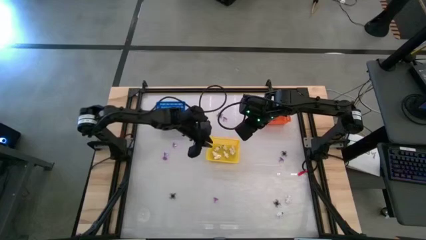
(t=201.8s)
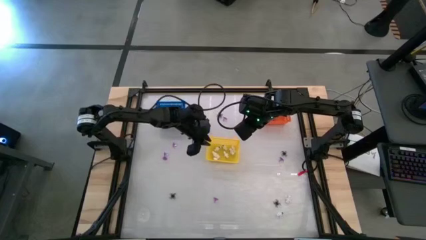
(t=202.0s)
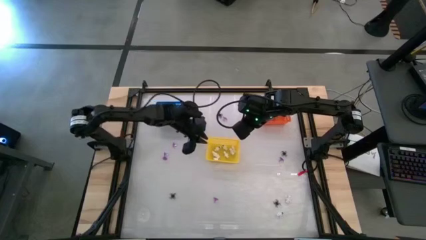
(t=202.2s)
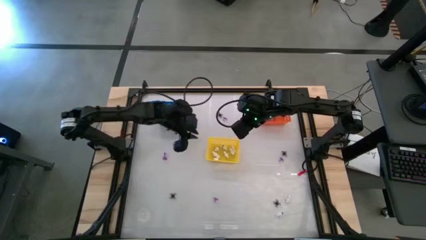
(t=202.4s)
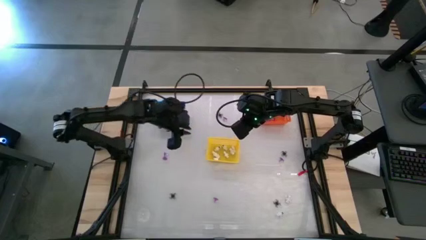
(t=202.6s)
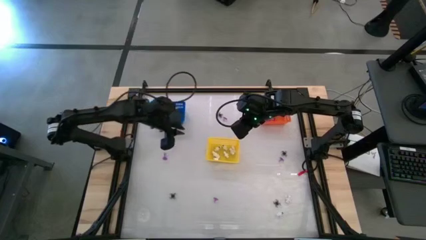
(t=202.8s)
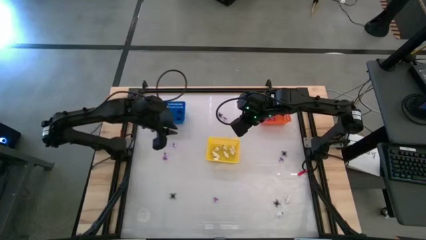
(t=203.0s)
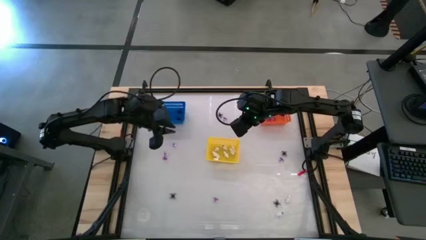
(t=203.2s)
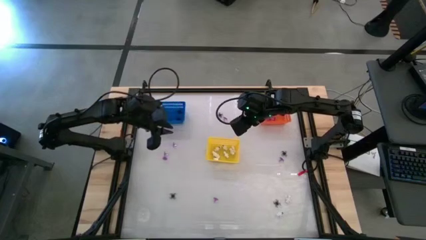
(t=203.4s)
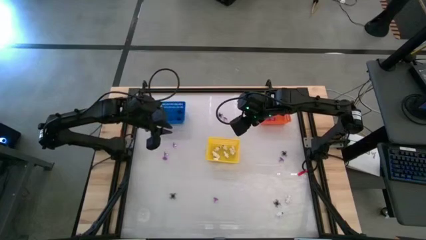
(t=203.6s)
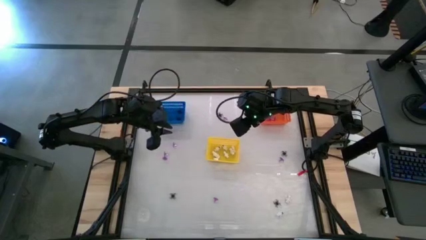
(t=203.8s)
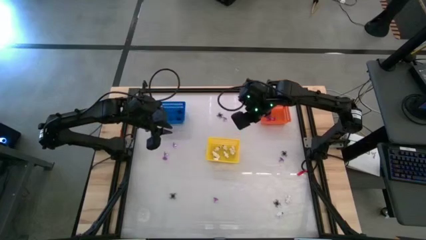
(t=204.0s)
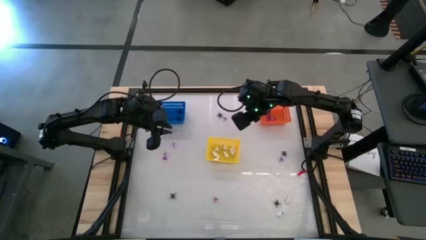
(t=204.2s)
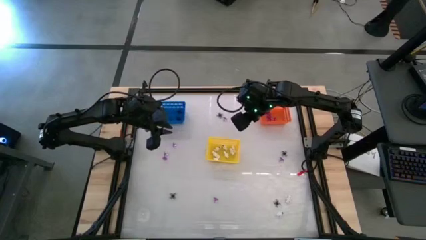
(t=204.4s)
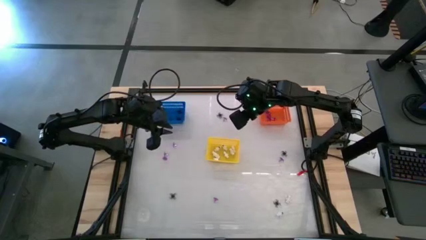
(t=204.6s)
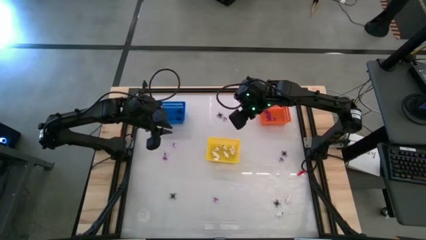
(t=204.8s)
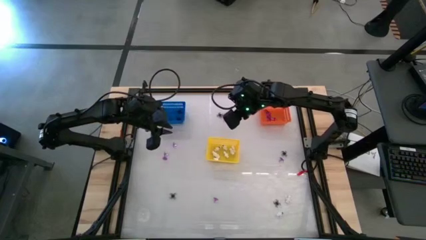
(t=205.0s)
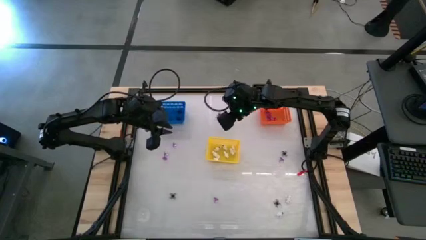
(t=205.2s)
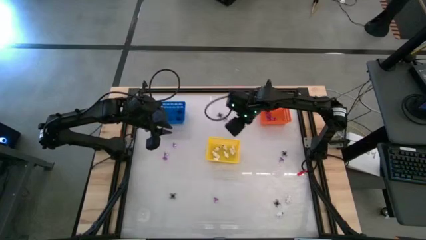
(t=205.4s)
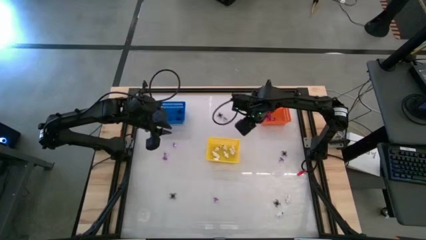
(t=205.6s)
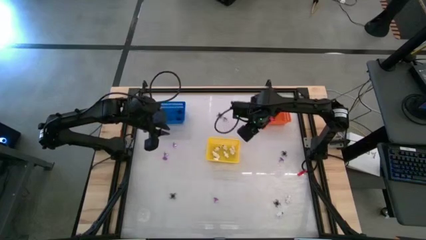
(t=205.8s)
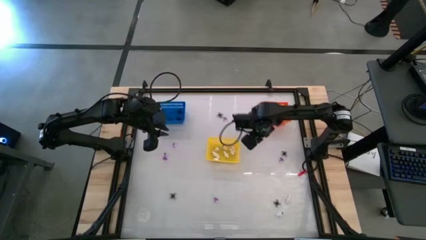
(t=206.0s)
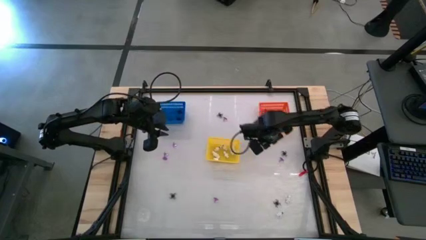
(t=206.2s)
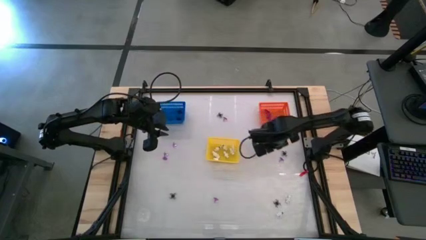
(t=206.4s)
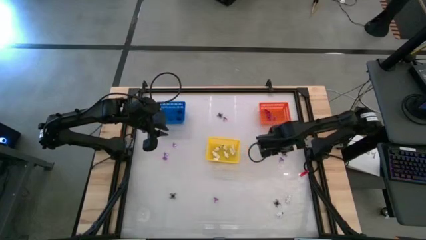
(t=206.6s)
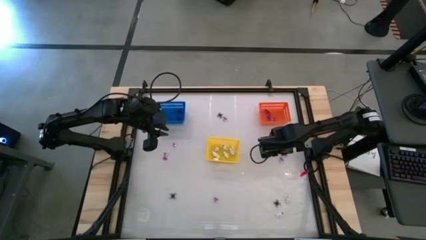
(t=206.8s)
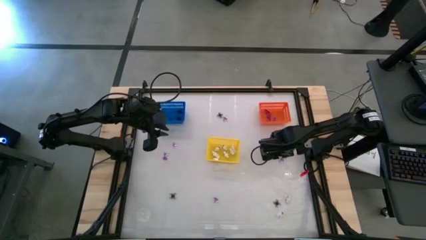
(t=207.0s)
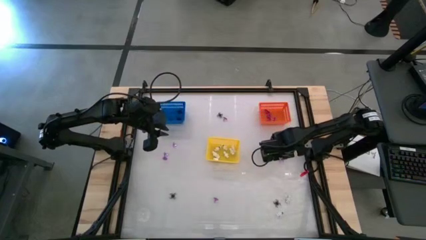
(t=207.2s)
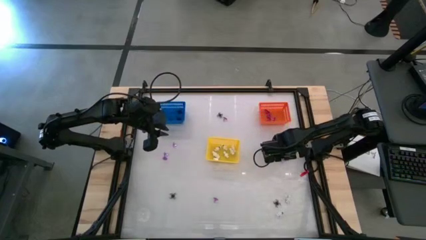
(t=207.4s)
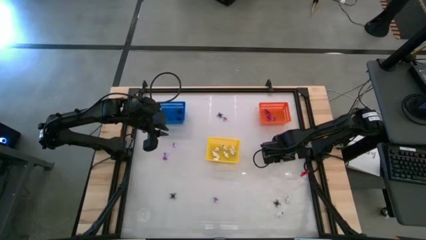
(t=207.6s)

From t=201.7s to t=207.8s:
Task: Sort Halloween decoration
Put the purple witch hat toy into the orange bin

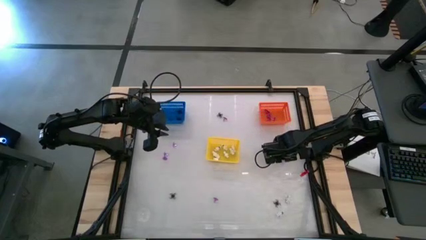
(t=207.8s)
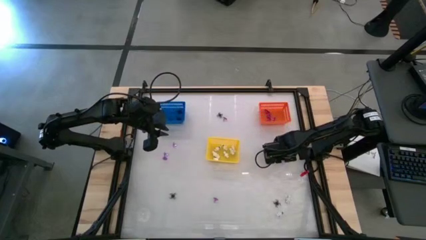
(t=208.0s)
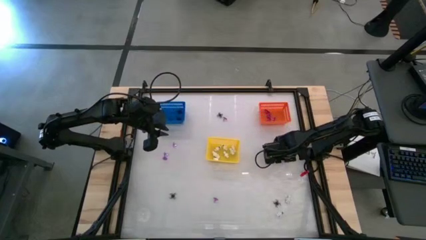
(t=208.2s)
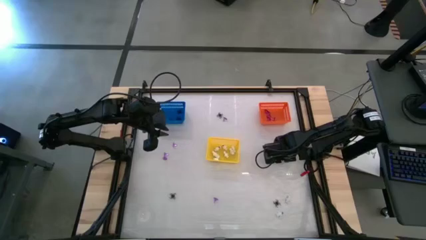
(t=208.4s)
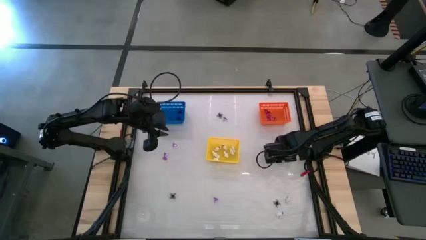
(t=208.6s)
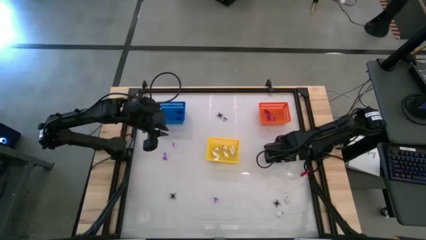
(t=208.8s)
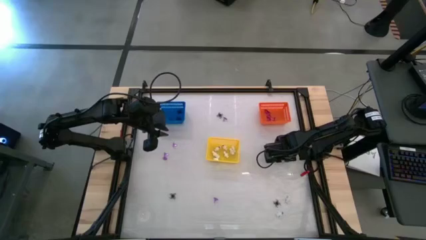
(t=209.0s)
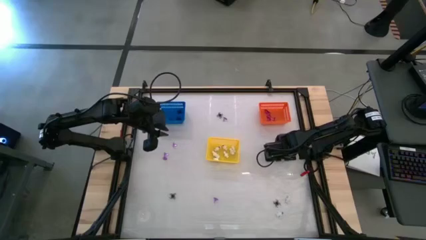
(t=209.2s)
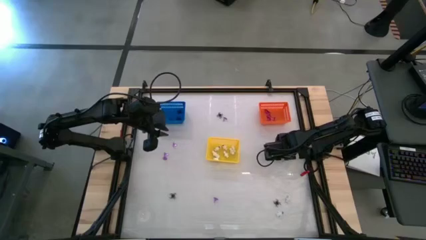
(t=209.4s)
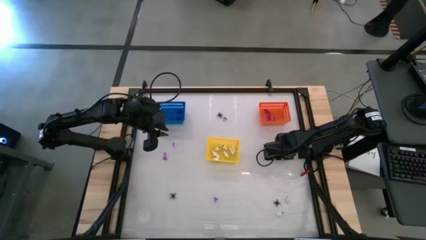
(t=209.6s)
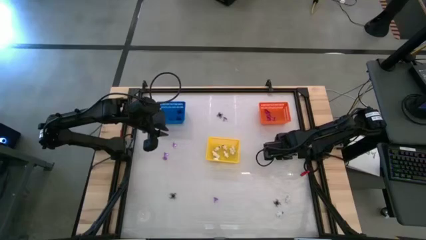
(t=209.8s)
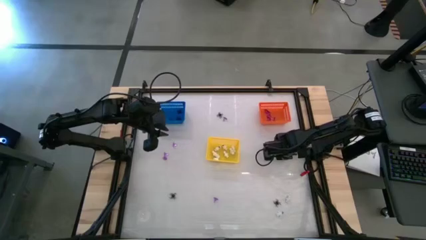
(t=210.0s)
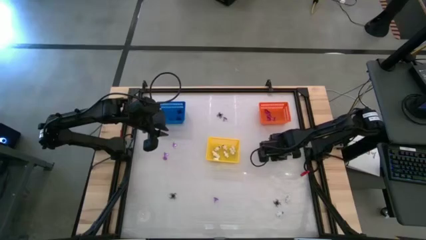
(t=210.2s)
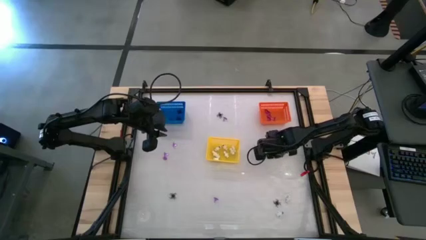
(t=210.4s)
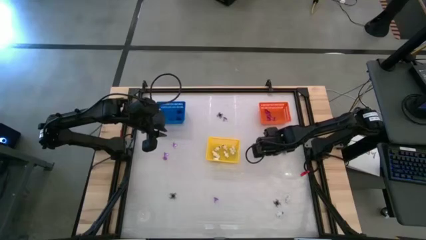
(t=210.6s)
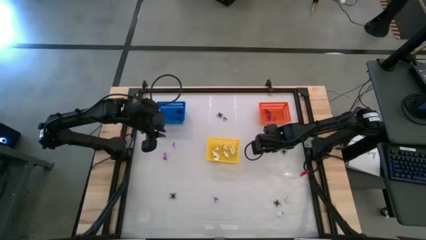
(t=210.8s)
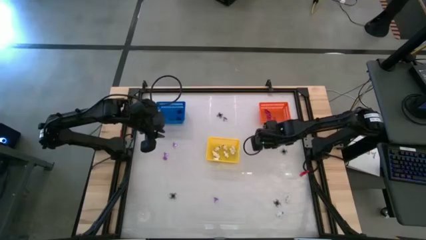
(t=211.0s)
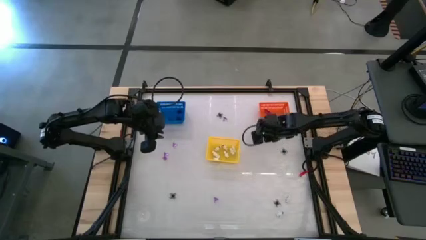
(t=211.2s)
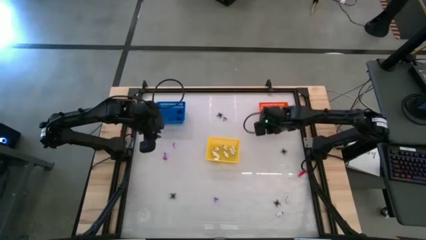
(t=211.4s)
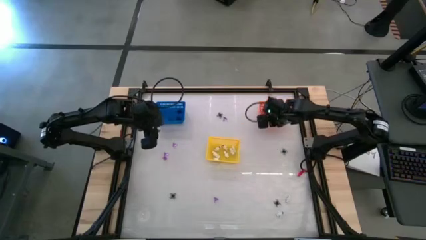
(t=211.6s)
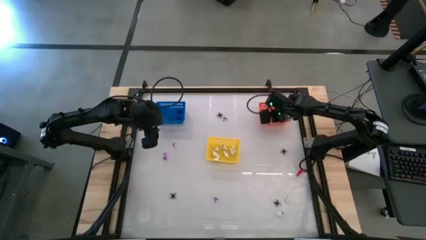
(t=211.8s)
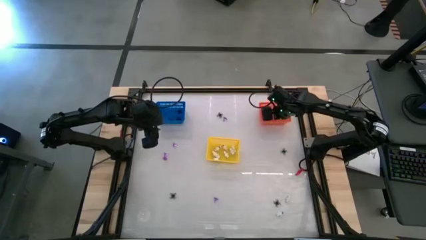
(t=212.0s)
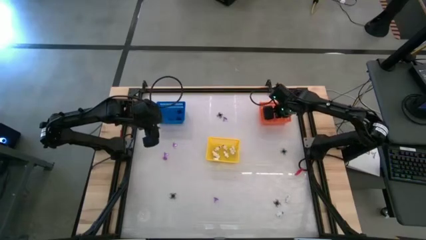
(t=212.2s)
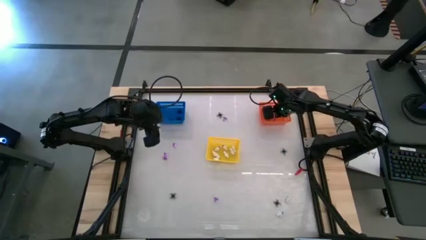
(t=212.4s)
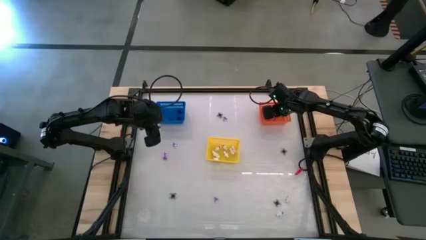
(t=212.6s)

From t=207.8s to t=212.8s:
Put the purple witch hat toy into the orange bin

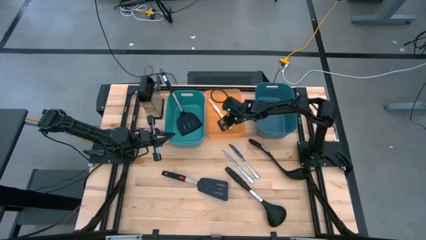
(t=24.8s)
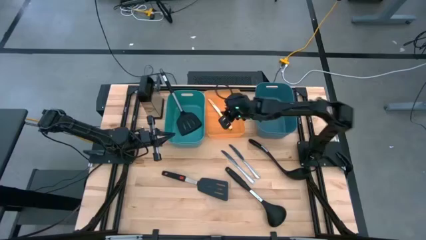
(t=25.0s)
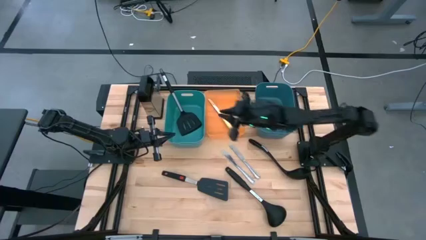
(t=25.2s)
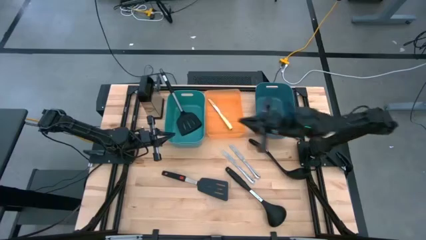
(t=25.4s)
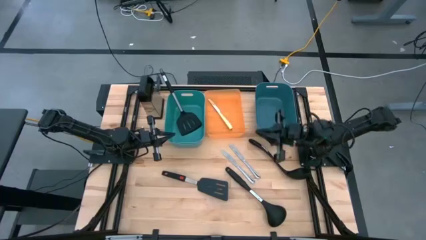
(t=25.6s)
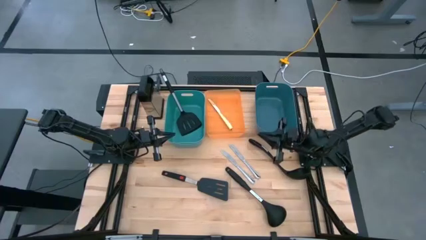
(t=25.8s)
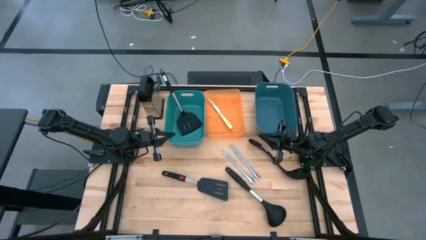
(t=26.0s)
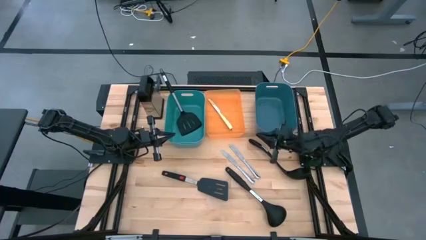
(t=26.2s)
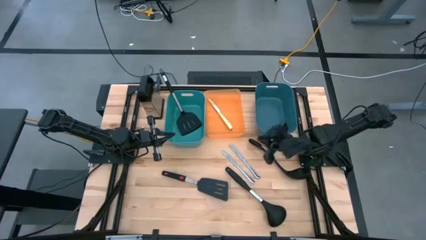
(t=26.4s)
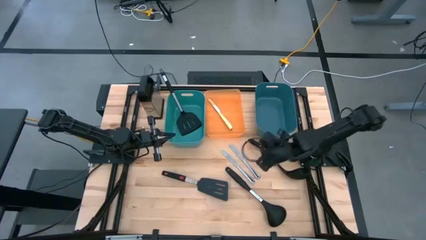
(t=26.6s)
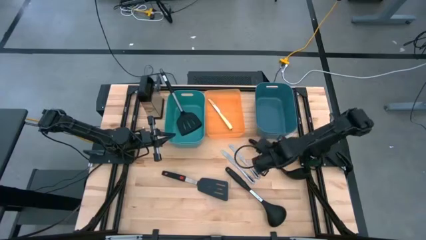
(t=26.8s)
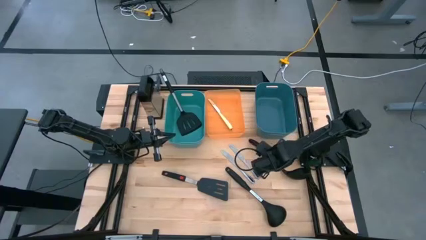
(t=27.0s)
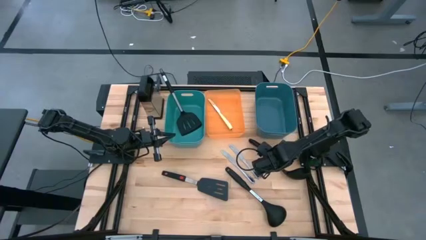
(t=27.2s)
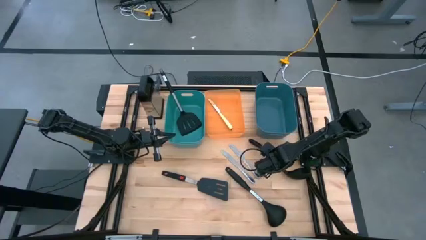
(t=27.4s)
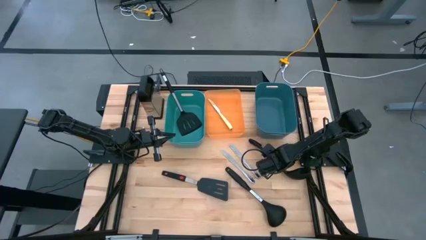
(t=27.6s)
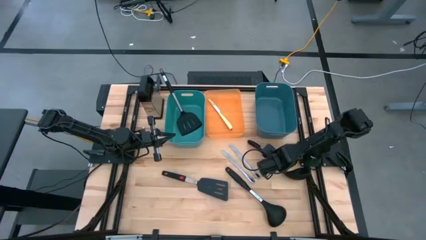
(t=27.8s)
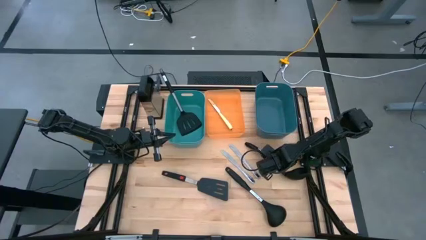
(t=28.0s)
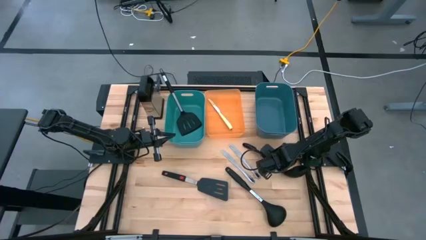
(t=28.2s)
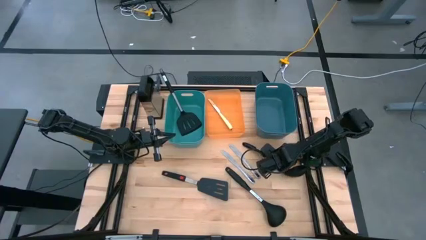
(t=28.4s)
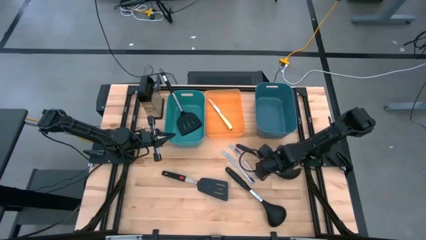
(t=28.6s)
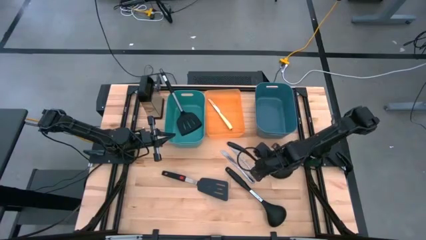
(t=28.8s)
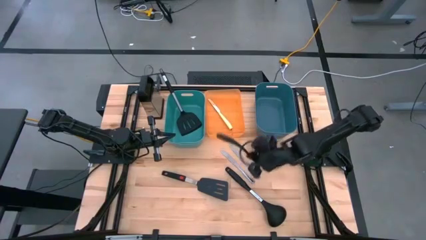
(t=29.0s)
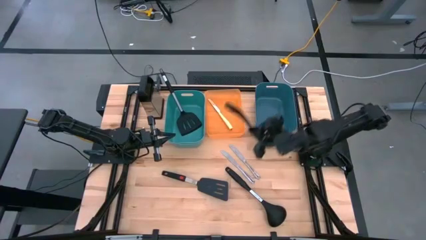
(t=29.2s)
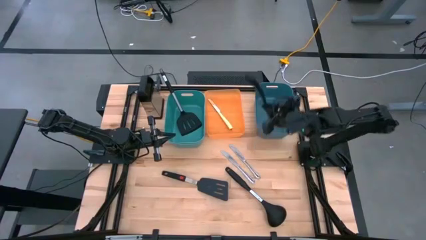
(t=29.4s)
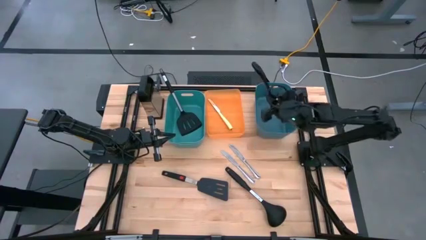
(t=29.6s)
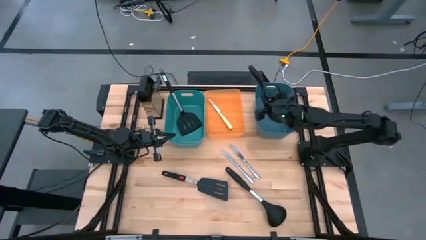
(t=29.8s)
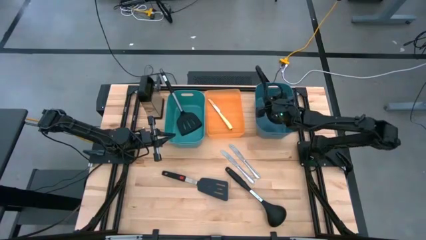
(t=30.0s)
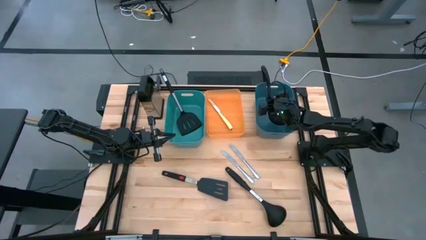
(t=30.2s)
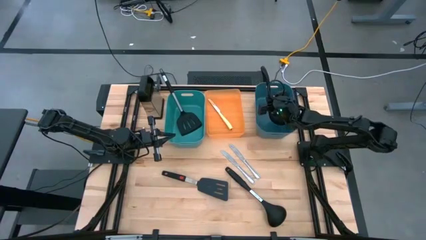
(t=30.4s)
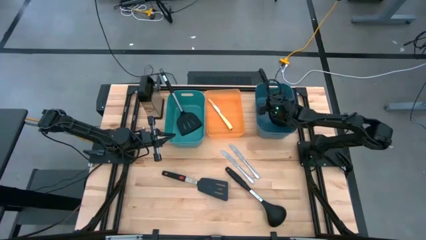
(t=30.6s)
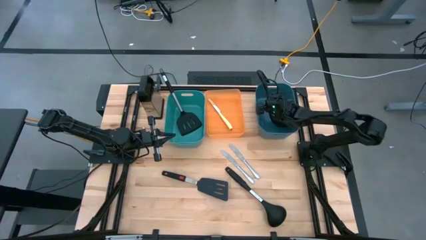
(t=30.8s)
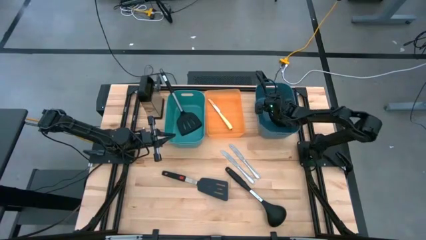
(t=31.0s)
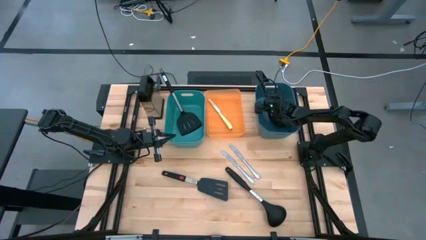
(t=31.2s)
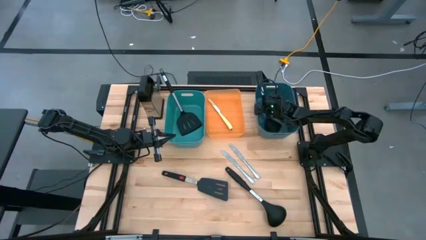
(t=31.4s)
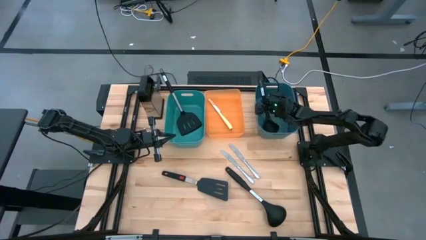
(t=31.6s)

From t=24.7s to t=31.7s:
Task: Pick & Place Kitchen Items
Put the top black spoon into the blue bin
